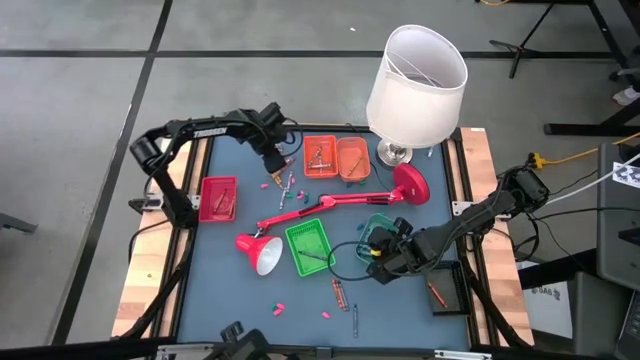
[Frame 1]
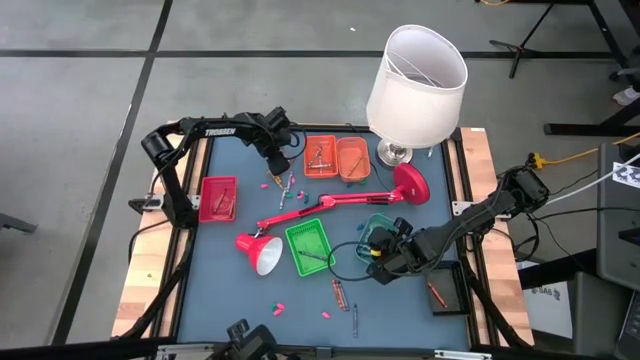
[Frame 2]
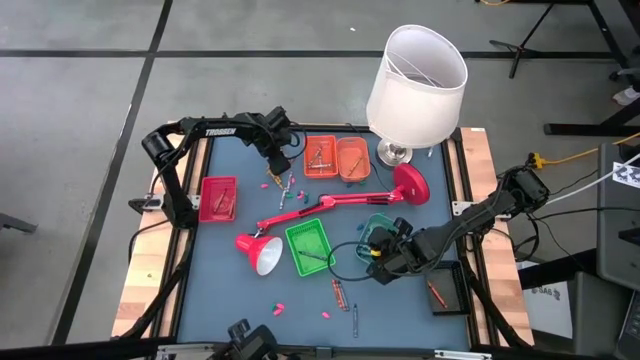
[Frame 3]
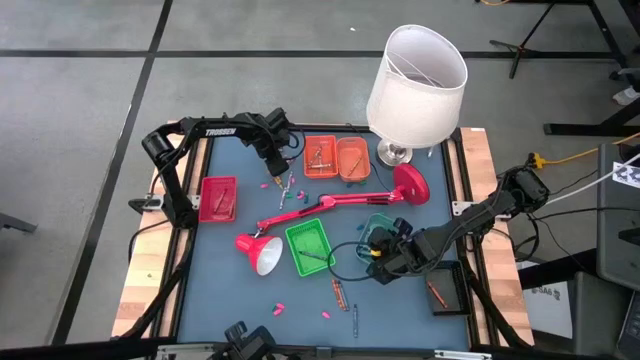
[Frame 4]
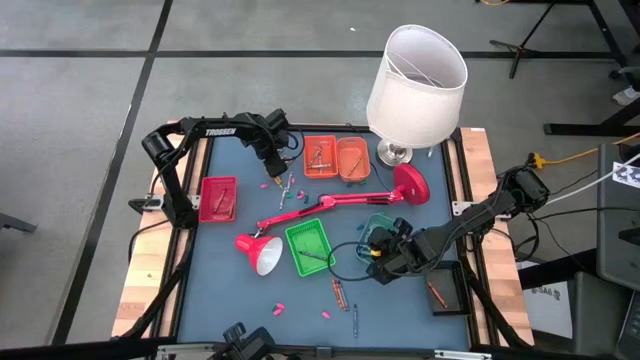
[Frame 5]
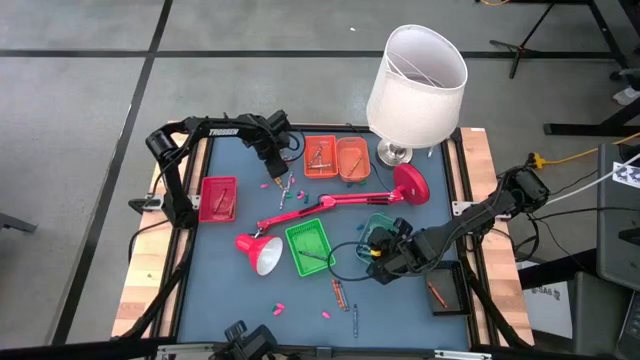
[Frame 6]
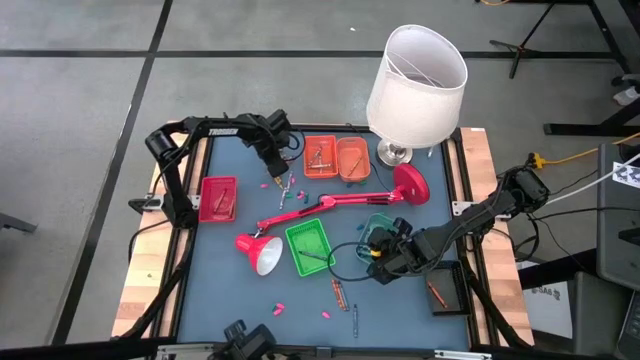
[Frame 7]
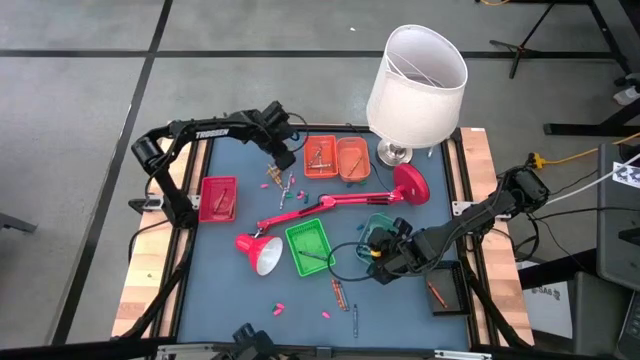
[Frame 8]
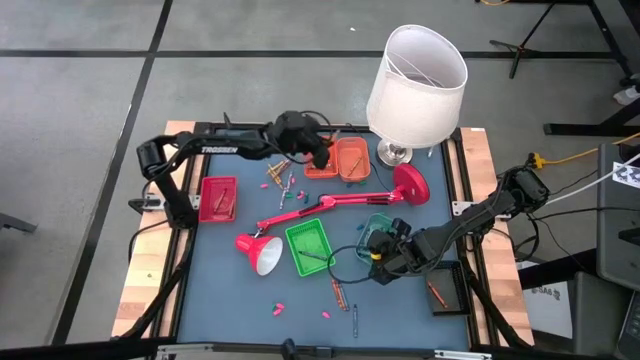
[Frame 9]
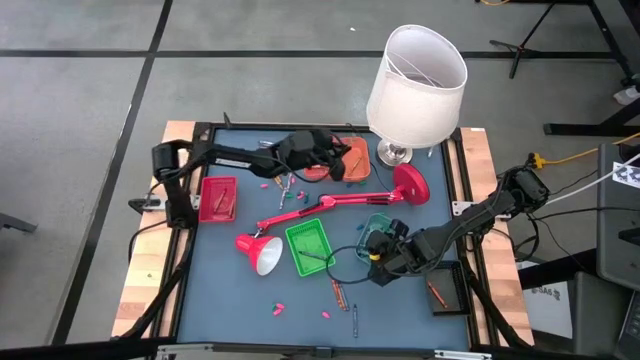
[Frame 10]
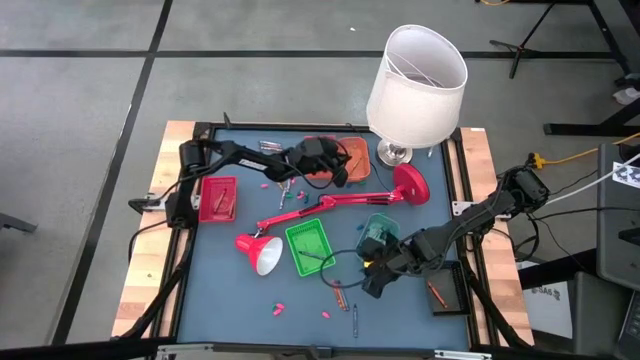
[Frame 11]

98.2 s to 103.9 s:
Task: Sort crayons
Put the yellow crayon into the light orange bin

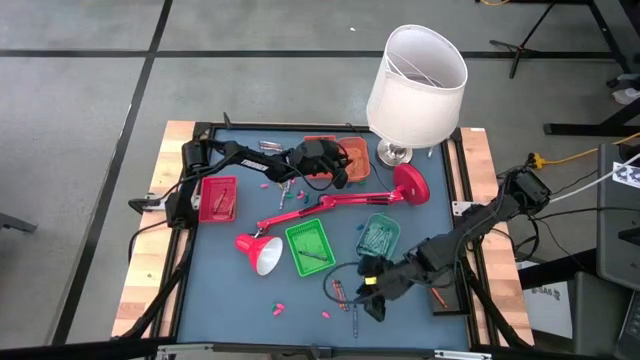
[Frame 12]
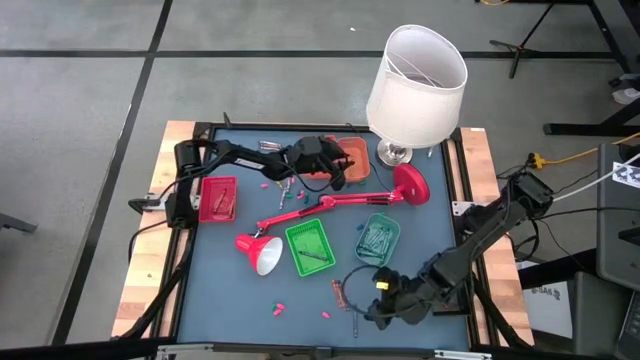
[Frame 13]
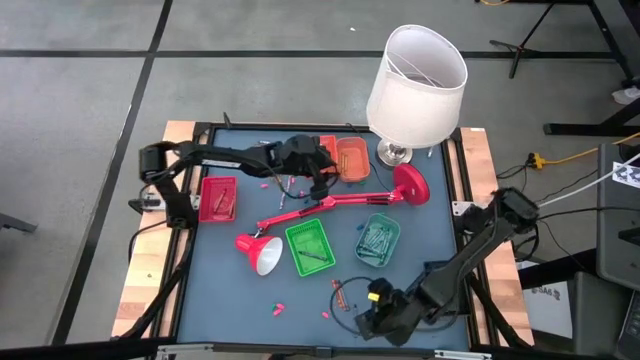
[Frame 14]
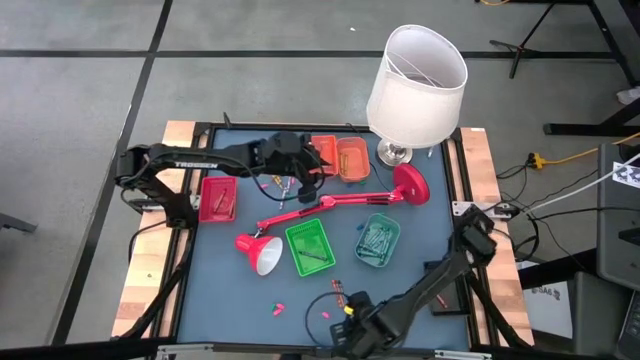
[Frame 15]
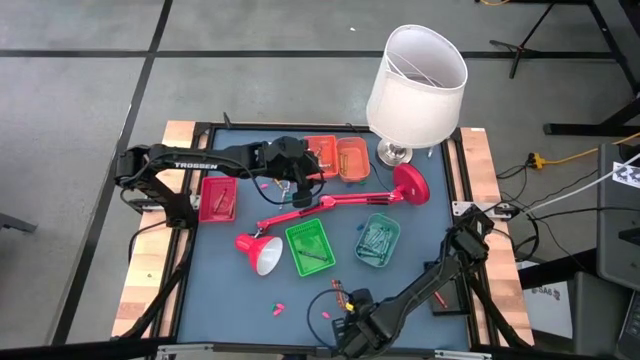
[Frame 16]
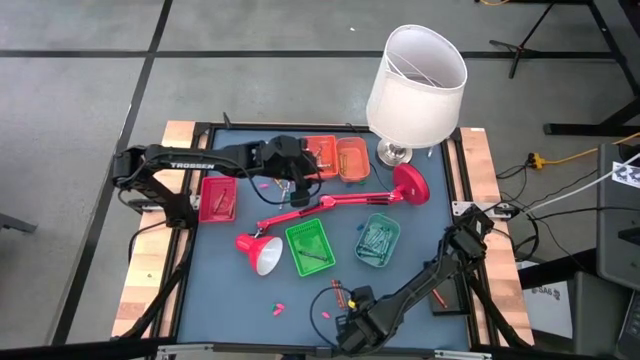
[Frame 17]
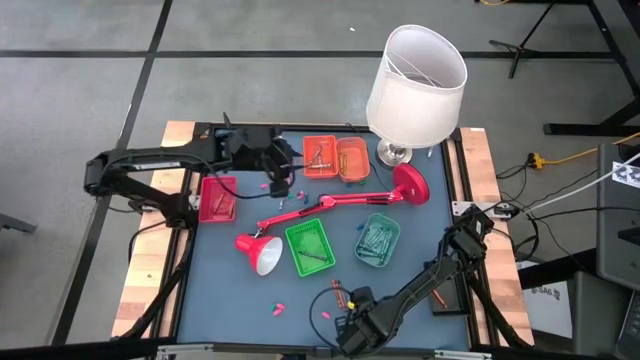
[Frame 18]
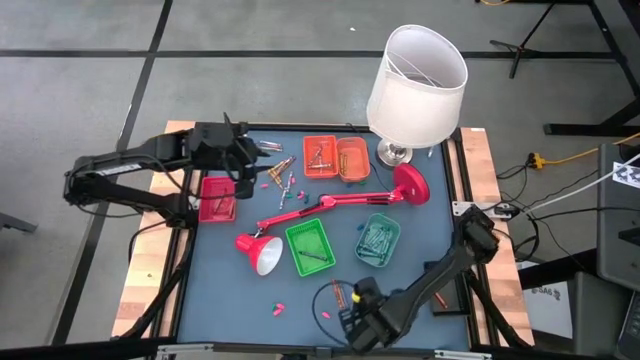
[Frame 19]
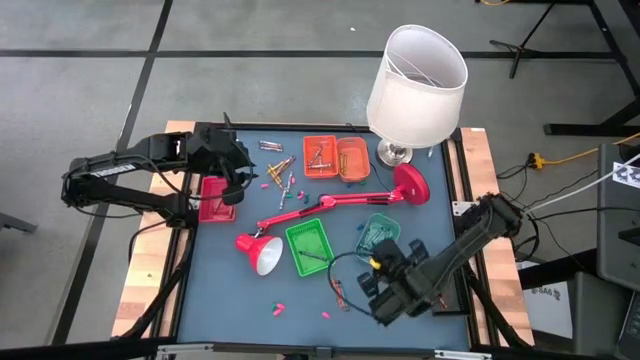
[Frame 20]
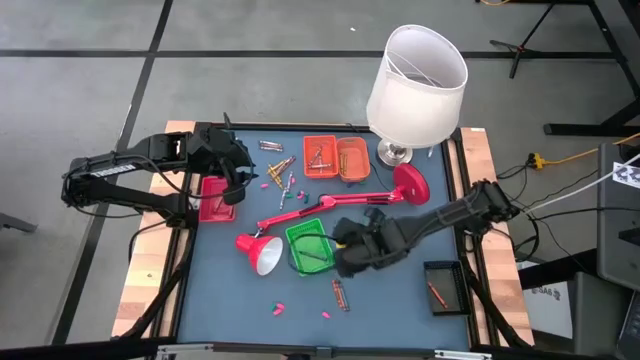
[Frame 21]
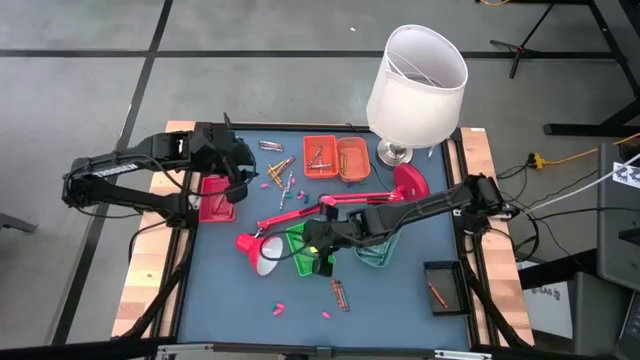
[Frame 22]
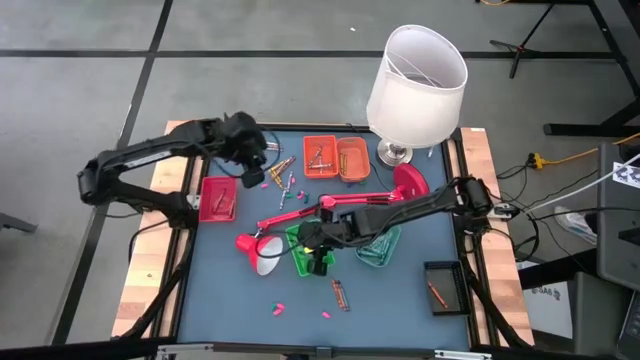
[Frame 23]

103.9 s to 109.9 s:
Put the violet crayon into the green bin

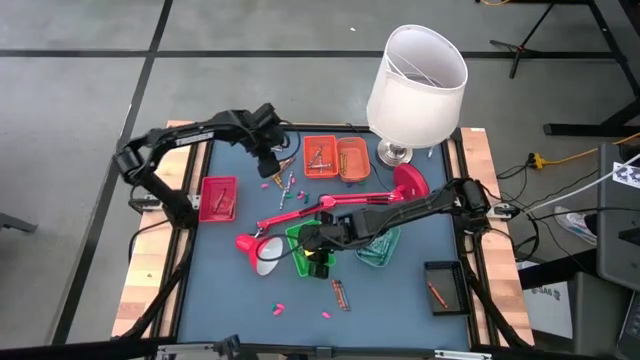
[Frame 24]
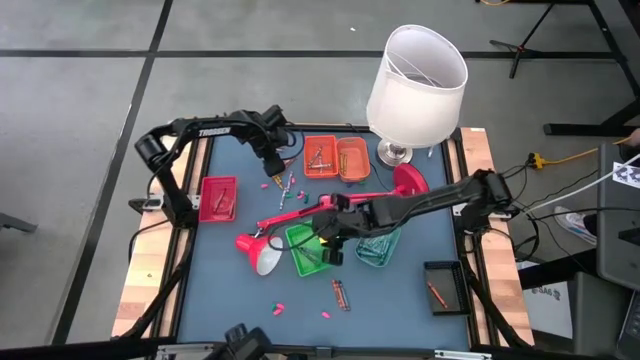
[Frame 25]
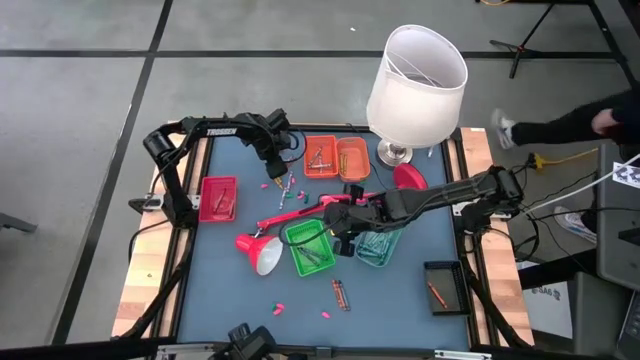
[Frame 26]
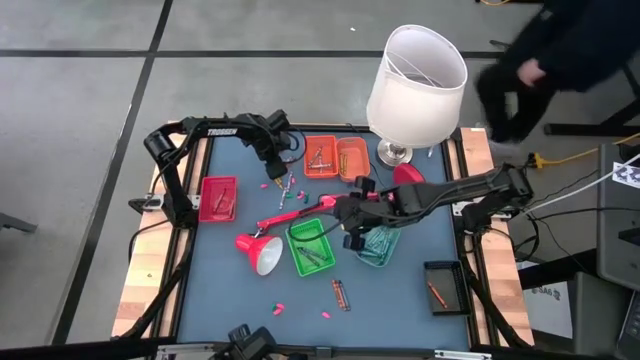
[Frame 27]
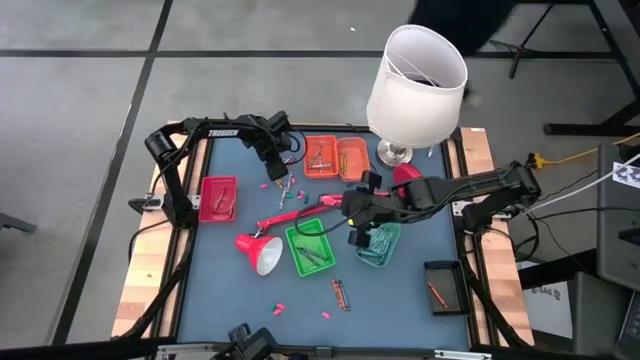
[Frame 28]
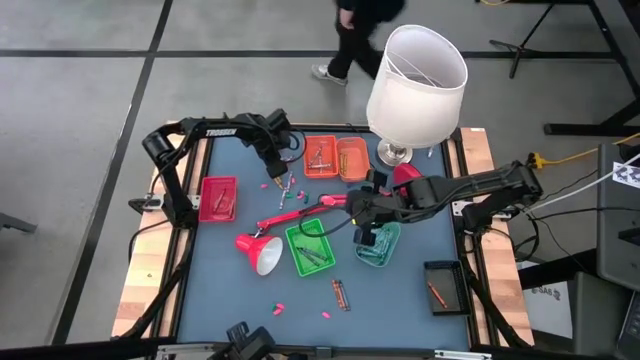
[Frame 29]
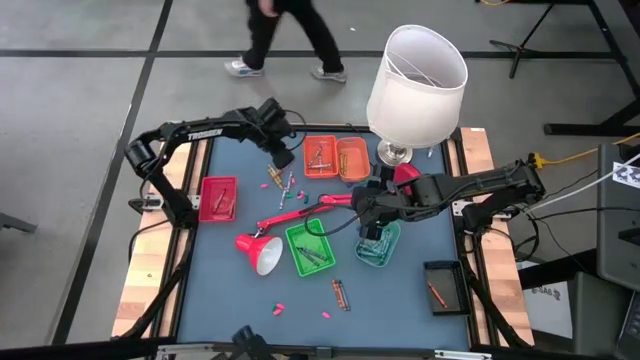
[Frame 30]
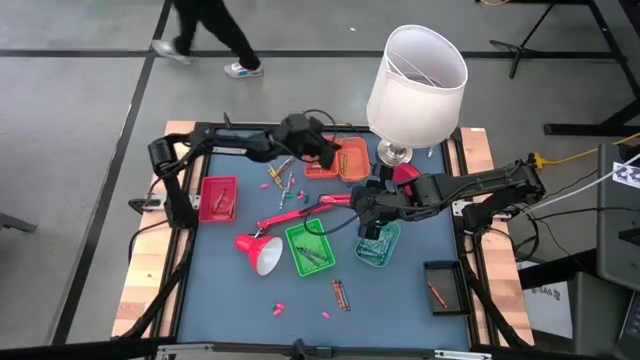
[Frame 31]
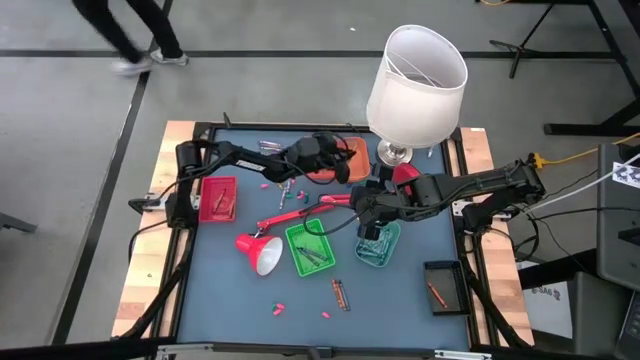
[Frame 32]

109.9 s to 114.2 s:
Put the yellow crayon into the light orange bin

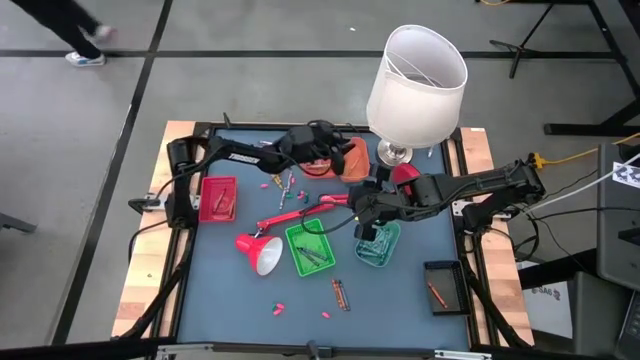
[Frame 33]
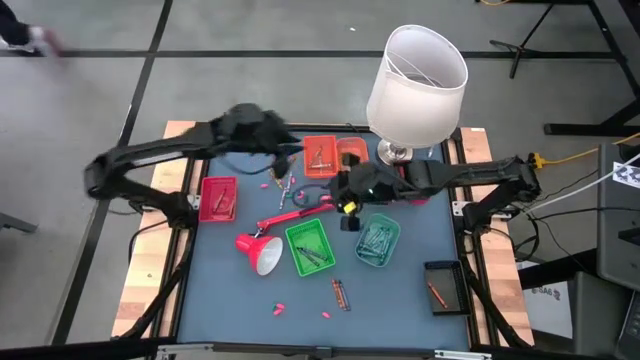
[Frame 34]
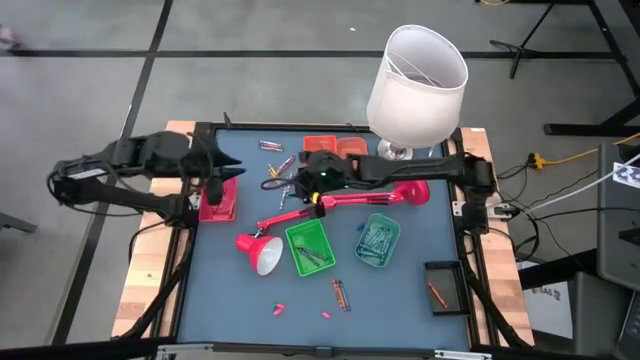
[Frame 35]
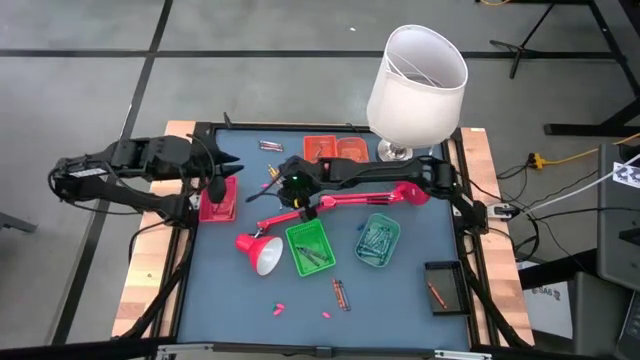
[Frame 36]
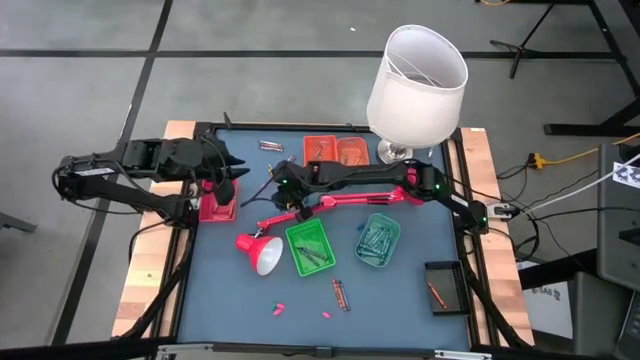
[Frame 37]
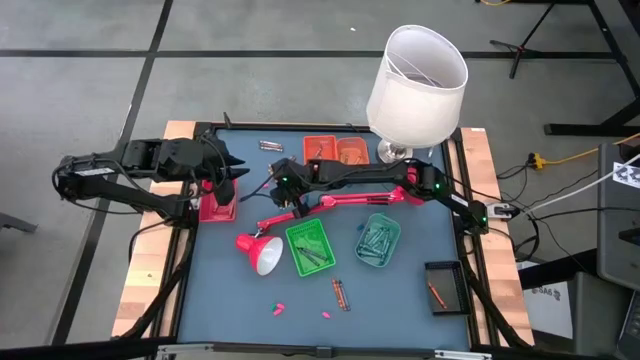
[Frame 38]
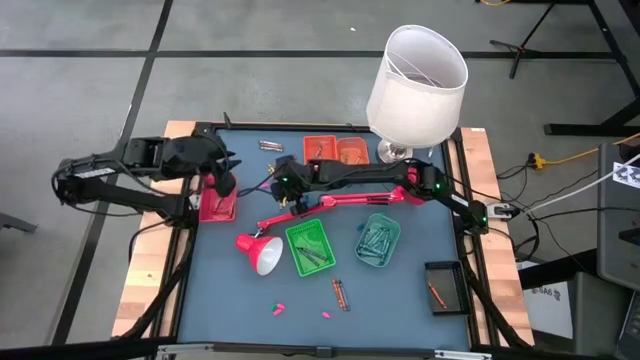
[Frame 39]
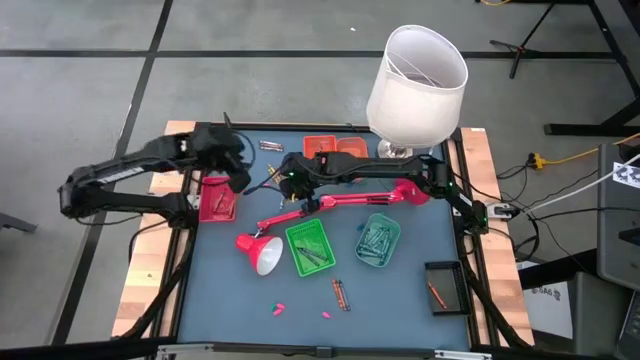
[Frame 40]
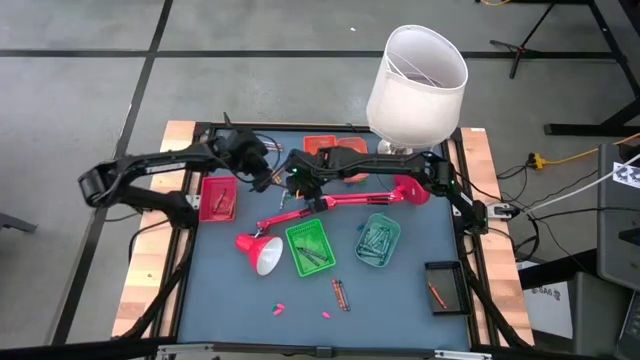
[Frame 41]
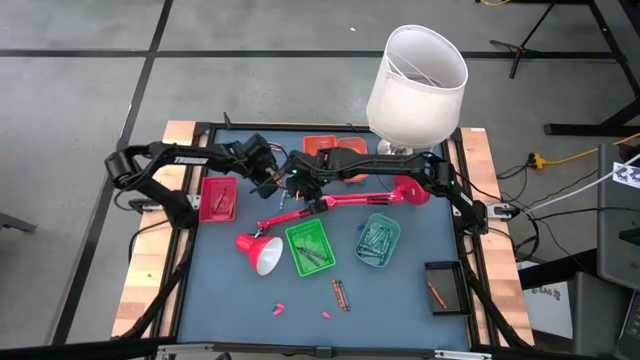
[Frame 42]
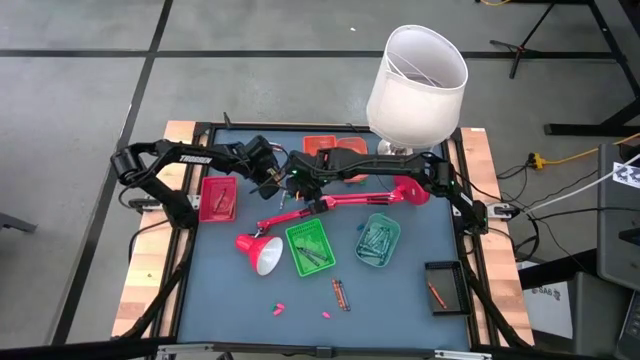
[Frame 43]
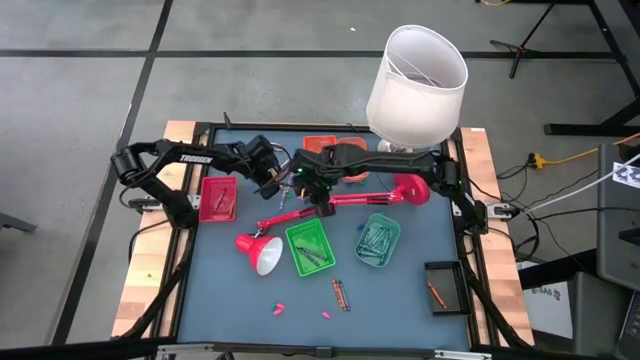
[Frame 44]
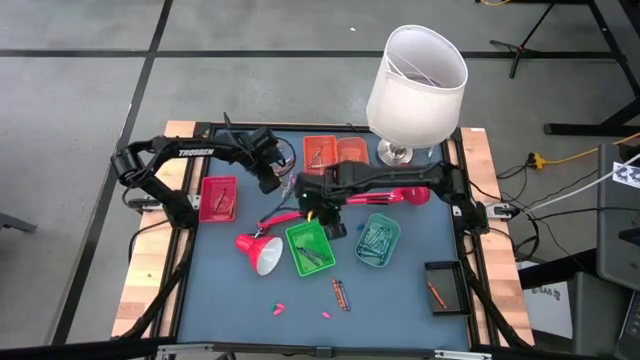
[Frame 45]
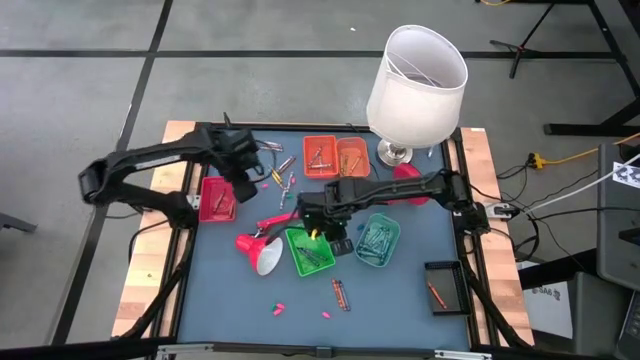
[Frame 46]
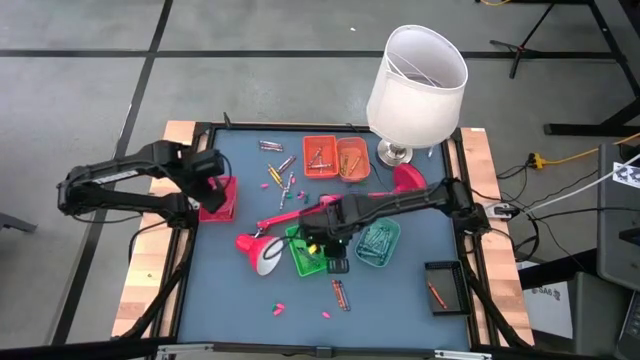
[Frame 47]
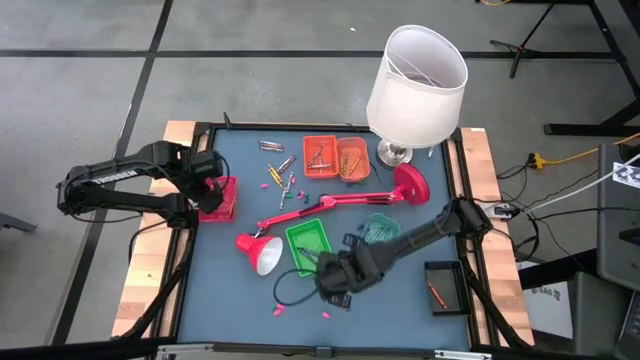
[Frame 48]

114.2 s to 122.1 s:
Put the brown crayon into the red bin
